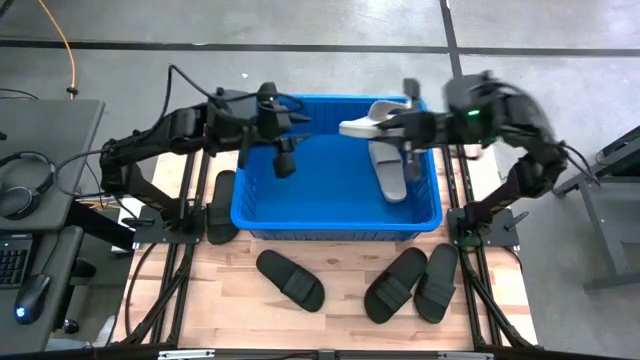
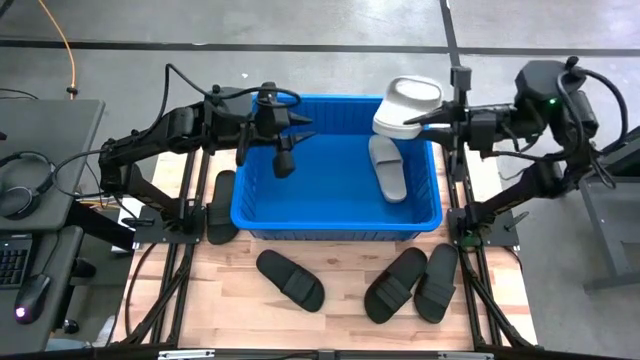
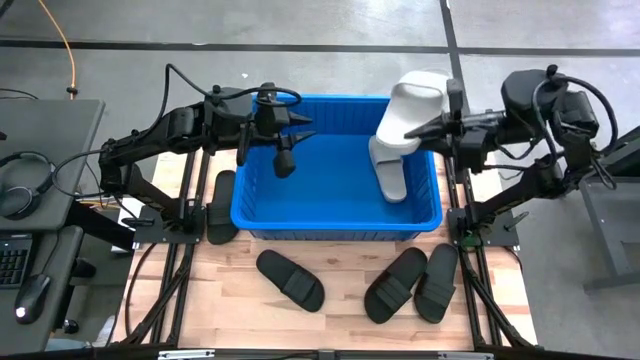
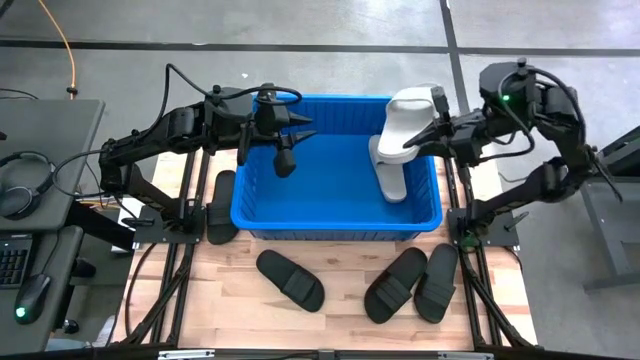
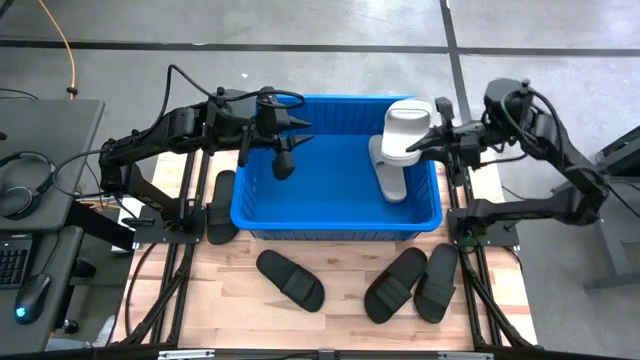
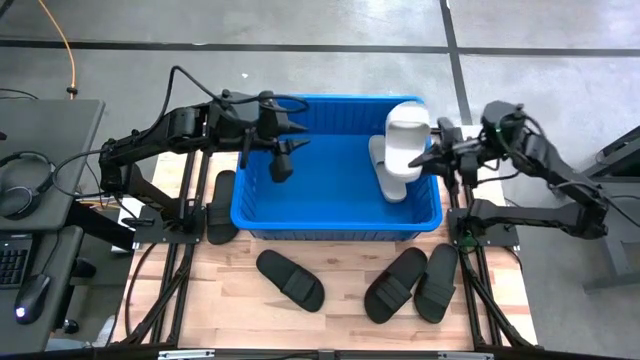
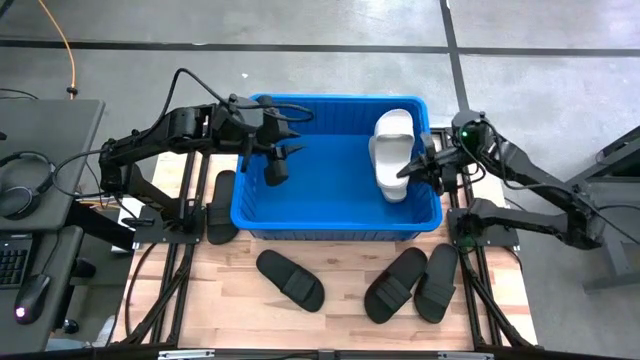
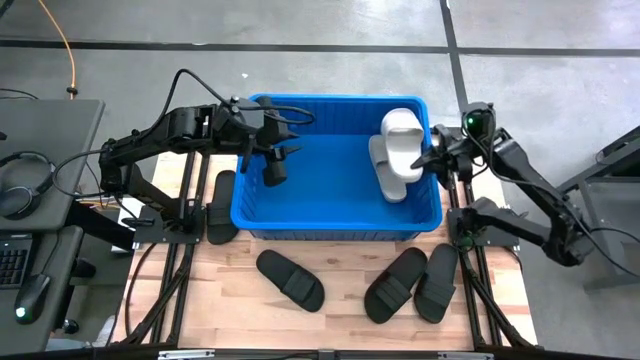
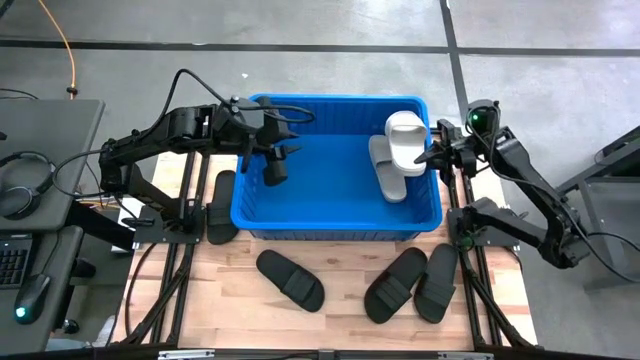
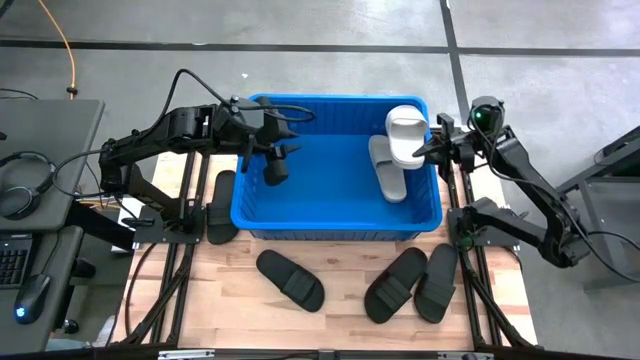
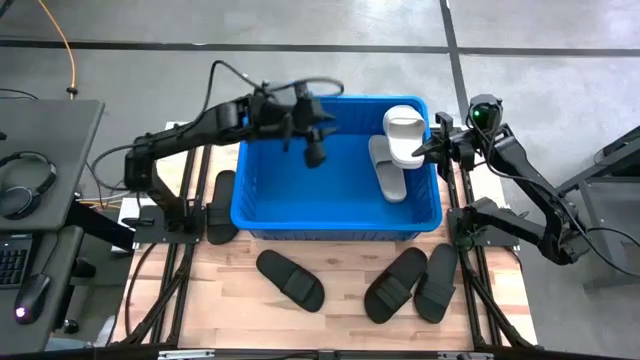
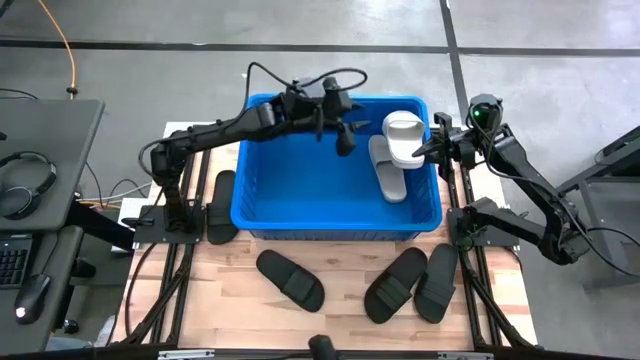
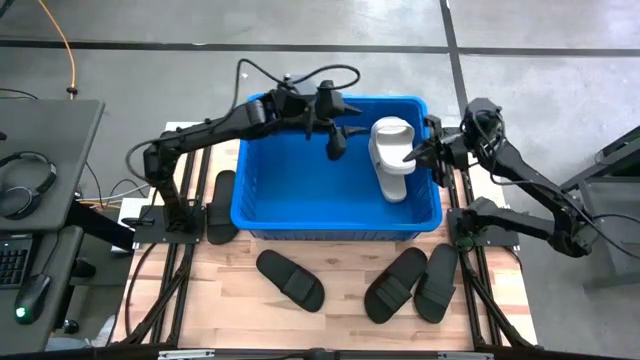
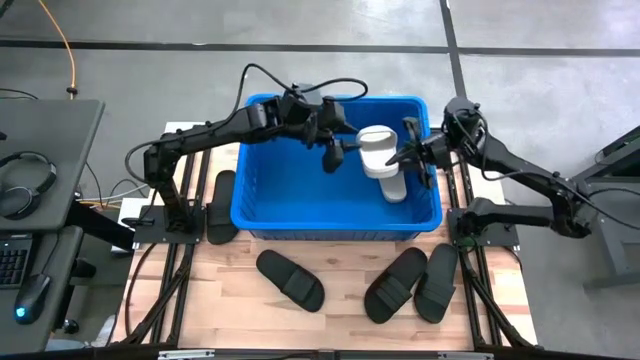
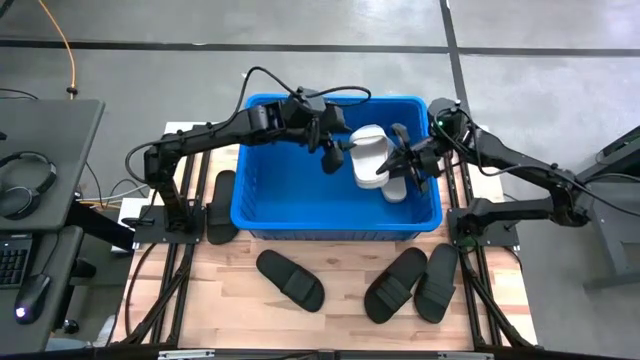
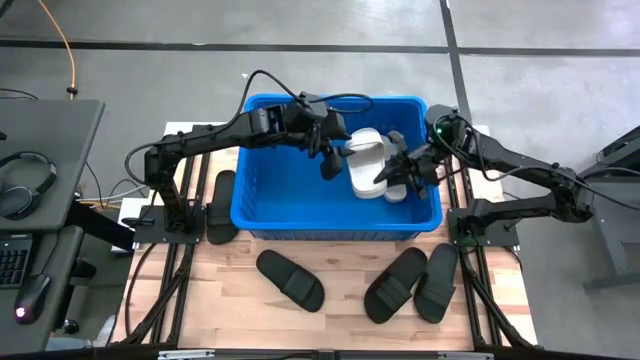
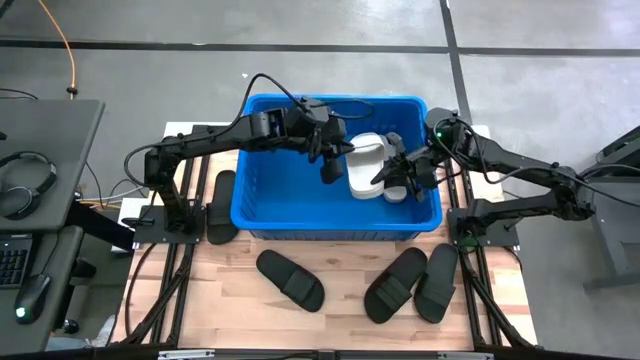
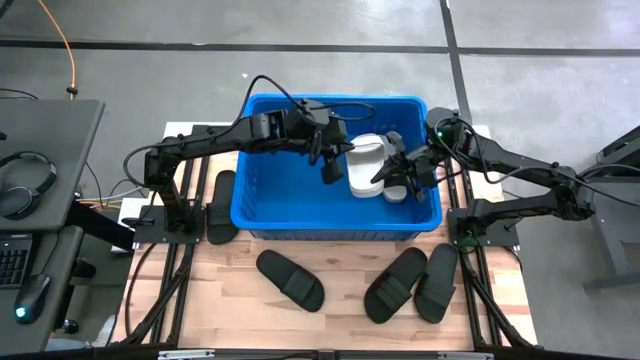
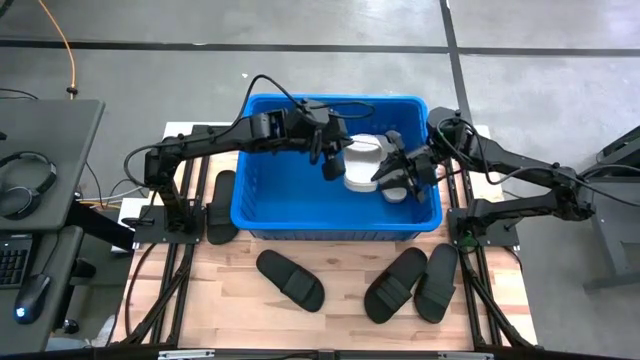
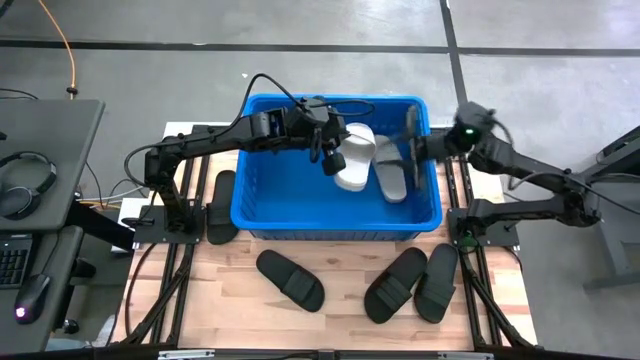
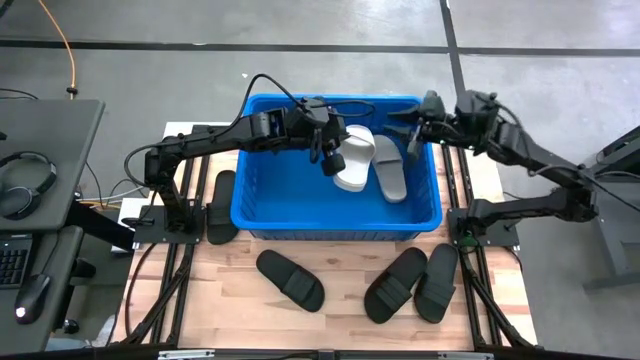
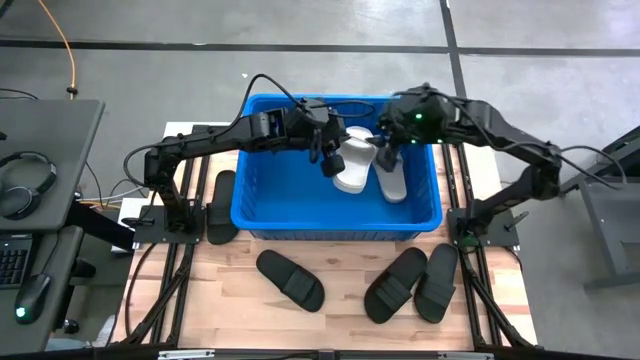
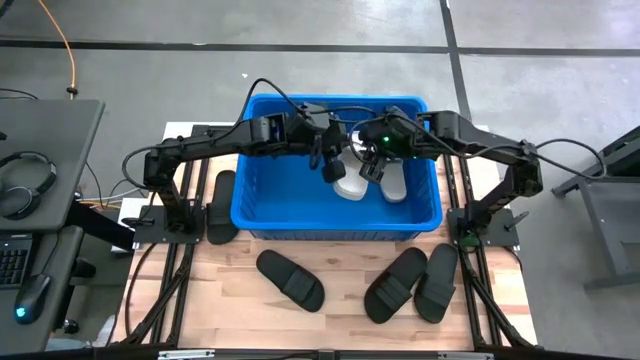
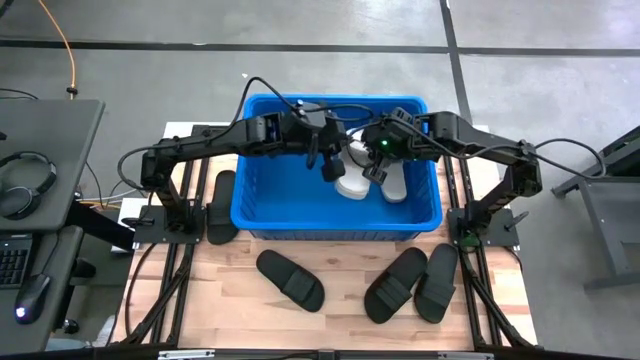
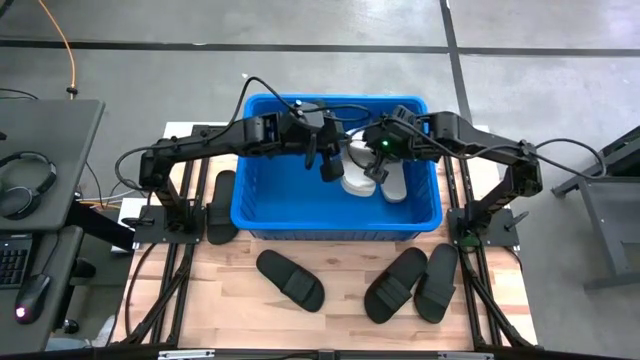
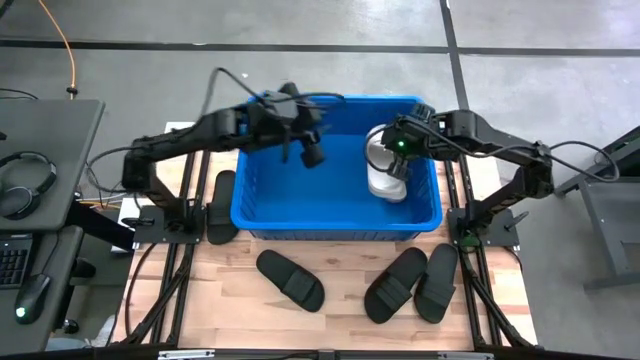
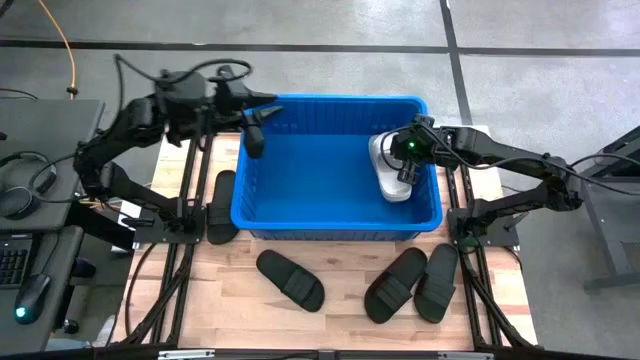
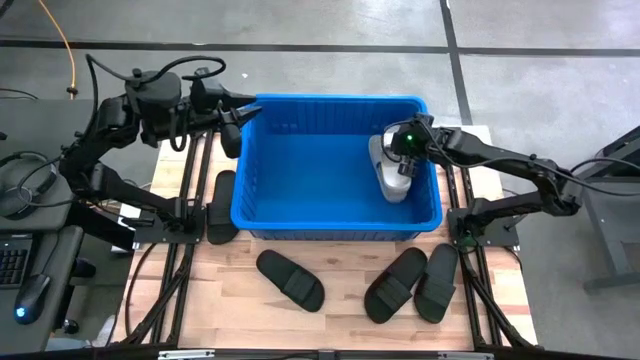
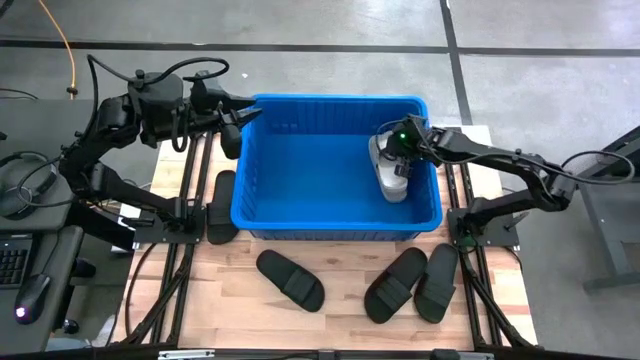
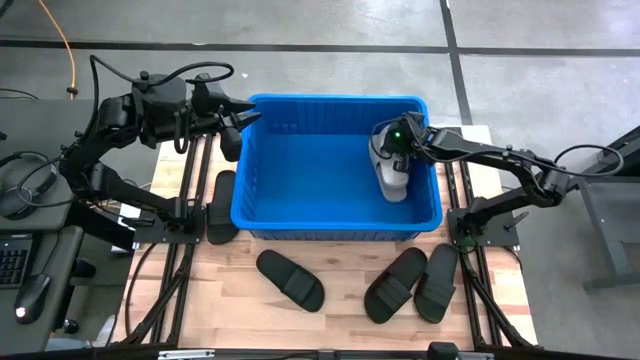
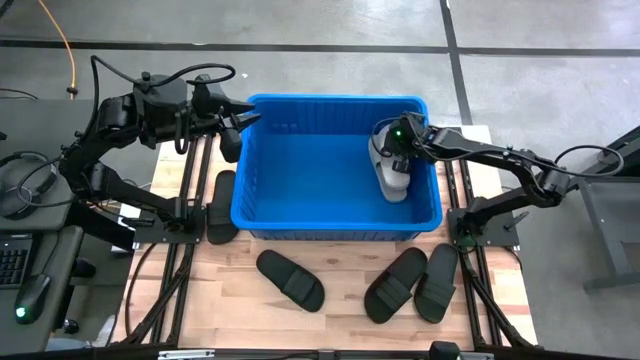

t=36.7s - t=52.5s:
Task: Pick and place slides into bin
Put the gray slide into the blue bin
